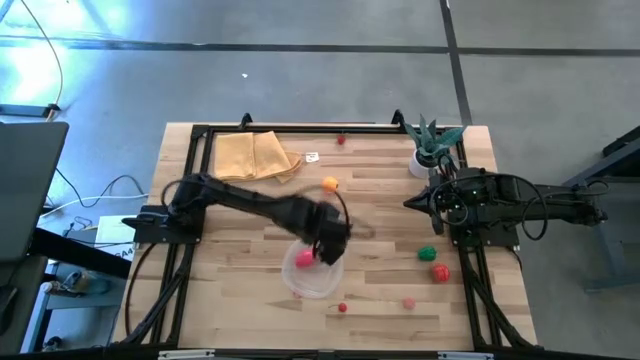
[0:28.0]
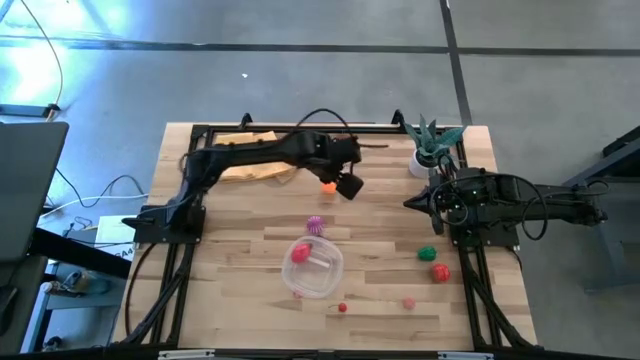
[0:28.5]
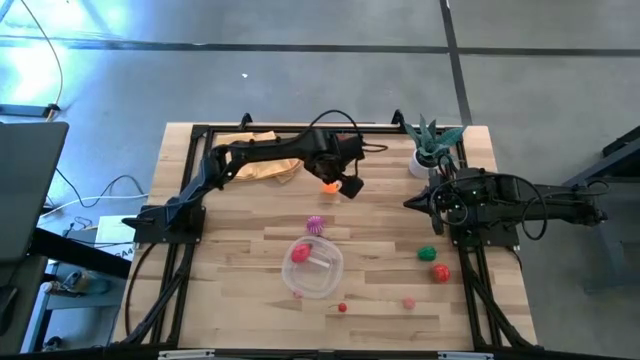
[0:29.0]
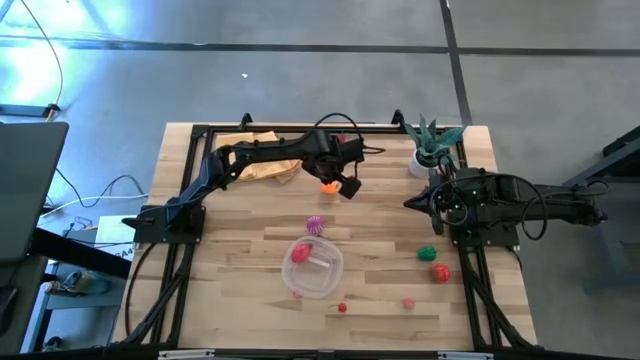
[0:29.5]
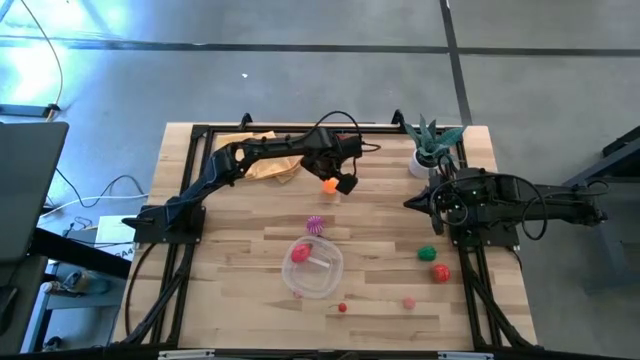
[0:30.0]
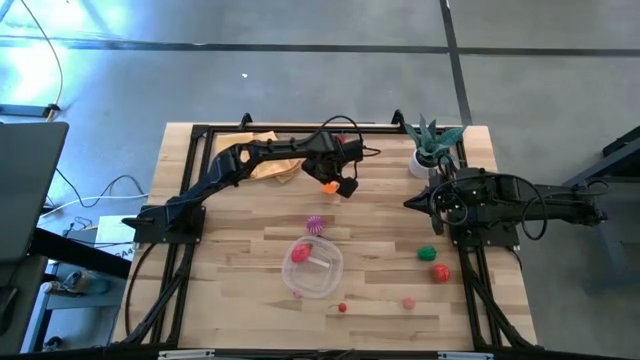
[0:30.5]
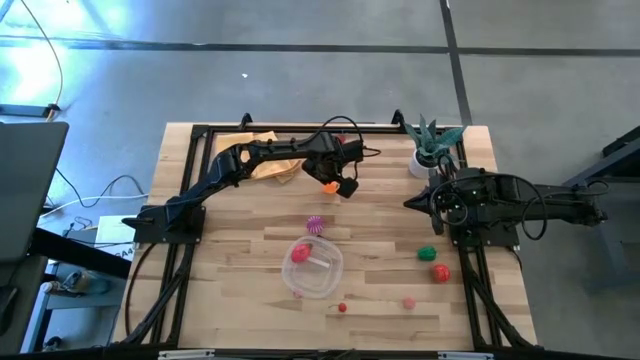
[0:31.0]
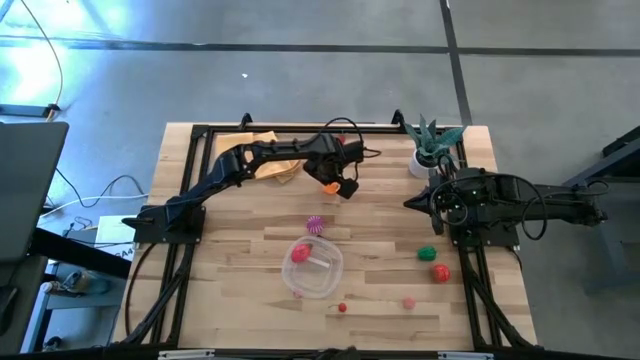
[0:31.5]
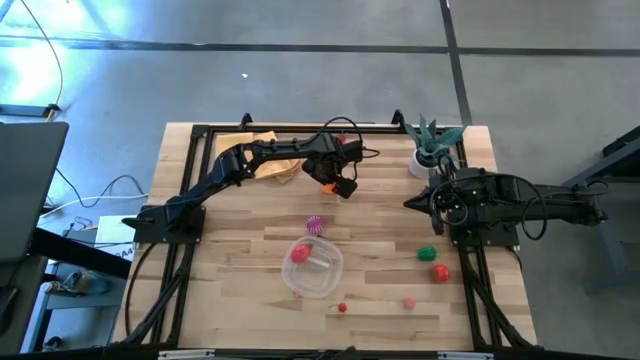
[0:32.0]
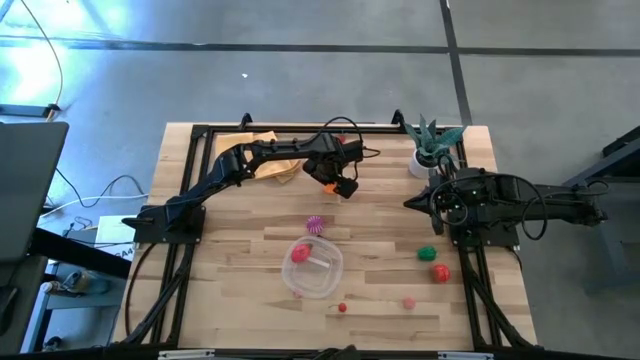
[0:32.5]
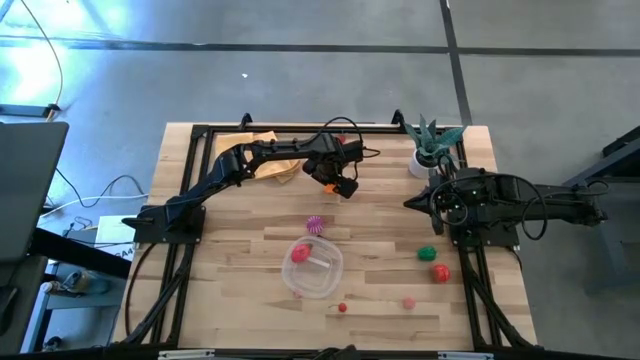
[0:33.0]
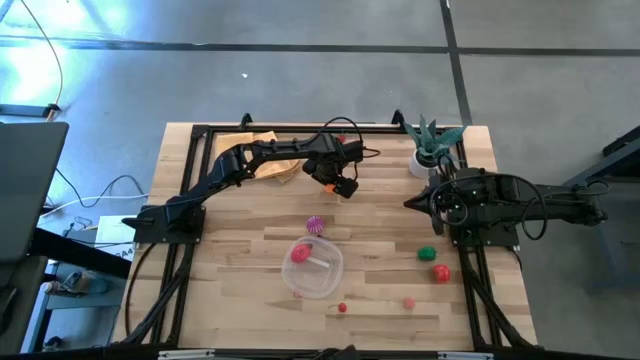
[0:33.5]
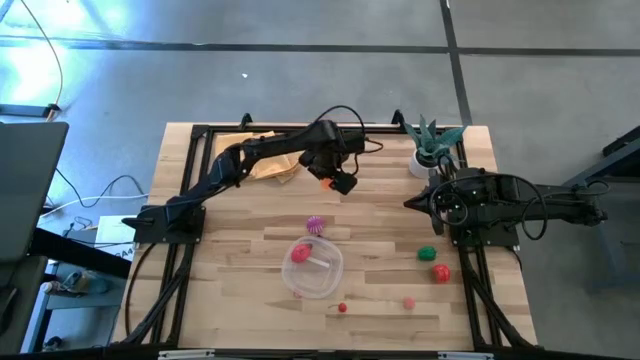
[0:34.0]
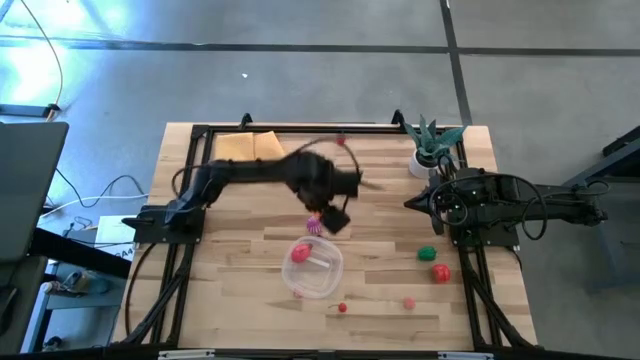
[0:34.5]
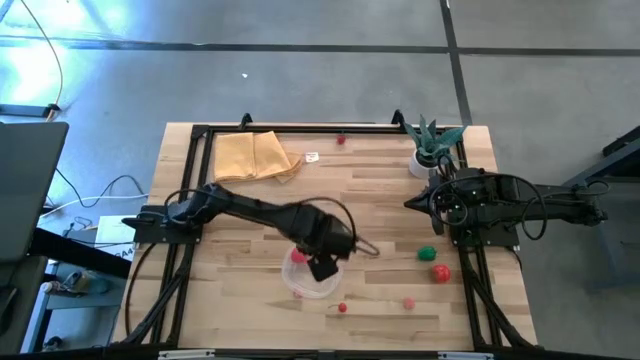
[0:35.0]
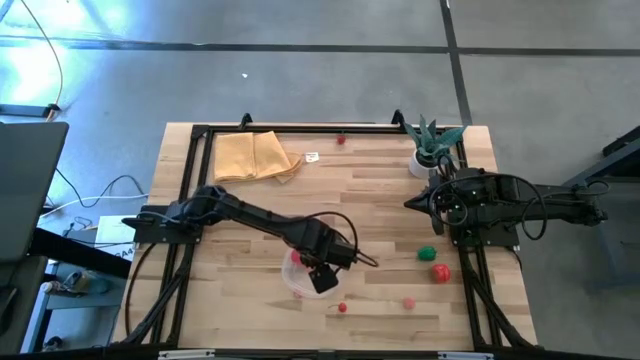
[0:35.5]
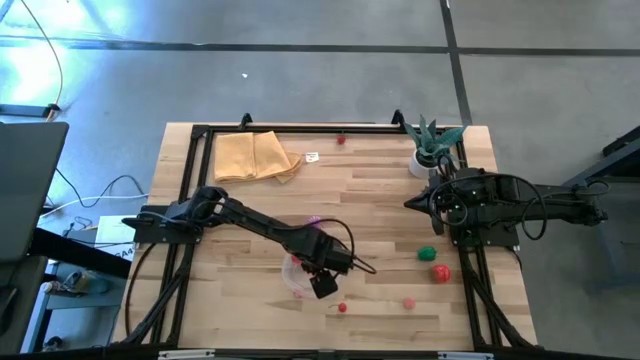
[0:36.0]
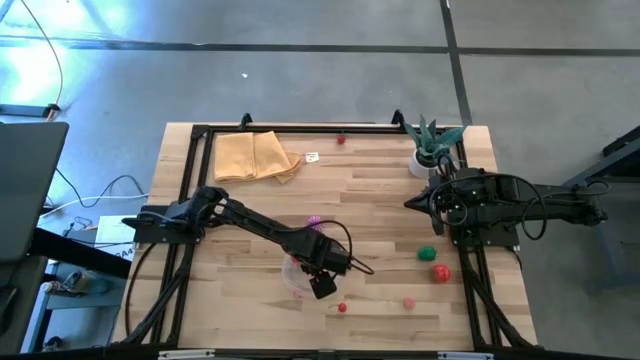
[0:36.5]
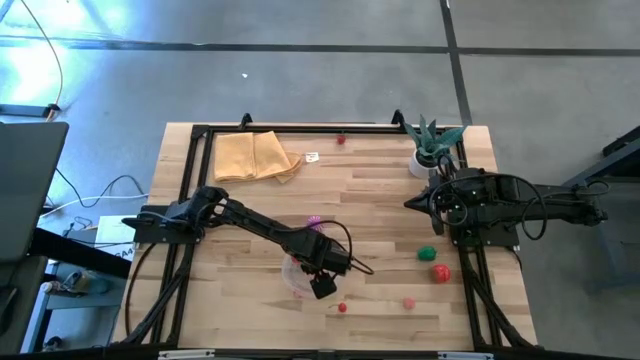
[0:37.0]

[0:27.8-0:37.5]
Task: Pick and placing Produce into tupperware
Put the orange into the bin

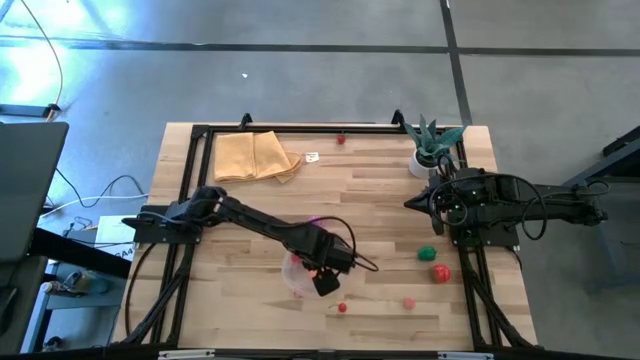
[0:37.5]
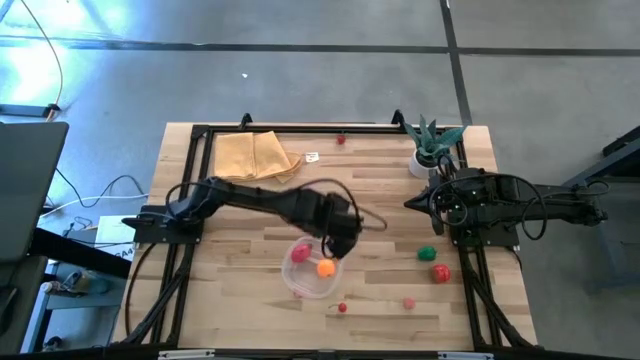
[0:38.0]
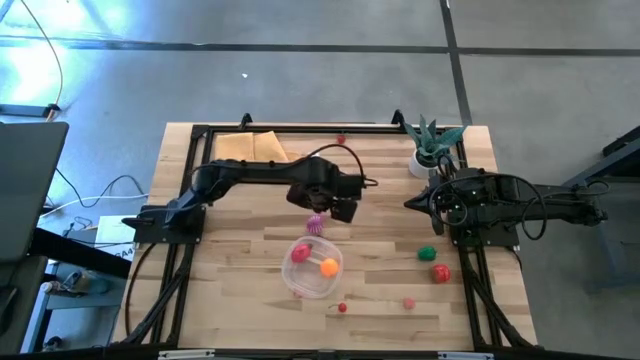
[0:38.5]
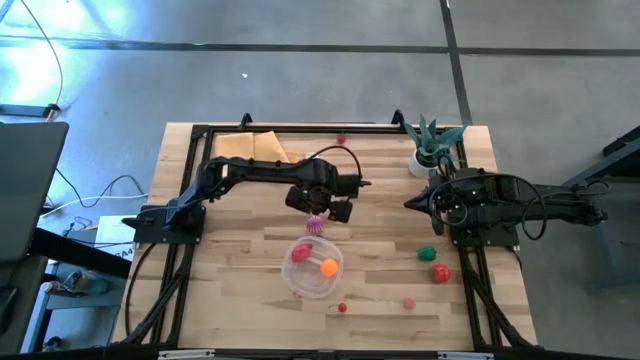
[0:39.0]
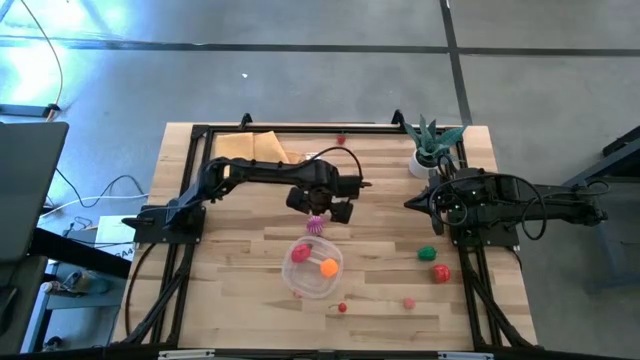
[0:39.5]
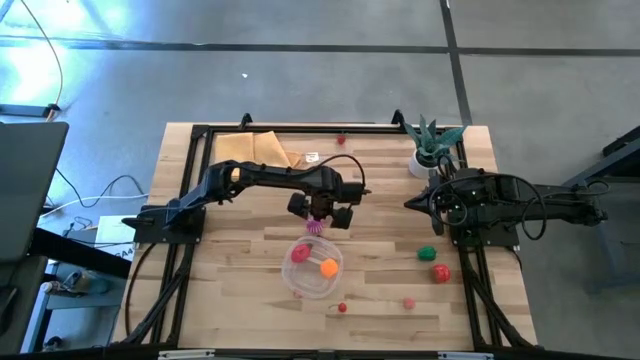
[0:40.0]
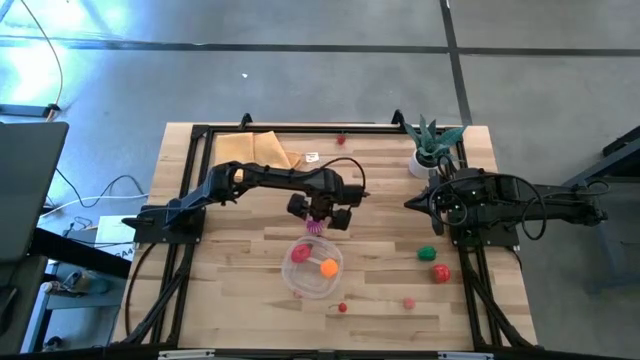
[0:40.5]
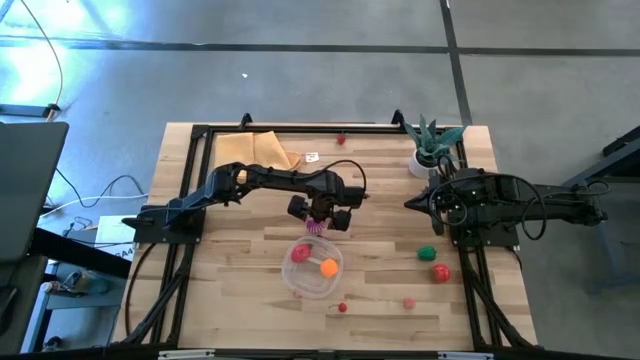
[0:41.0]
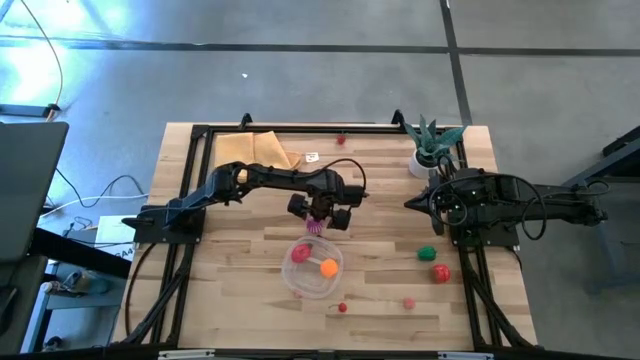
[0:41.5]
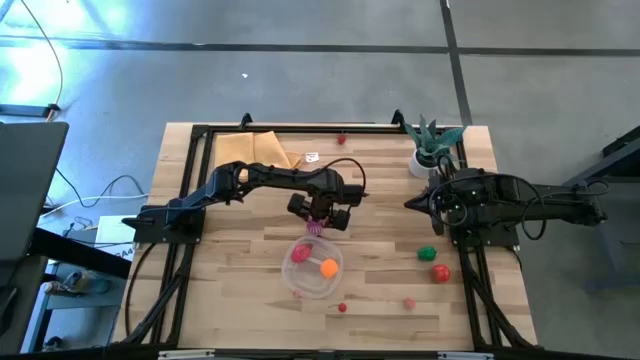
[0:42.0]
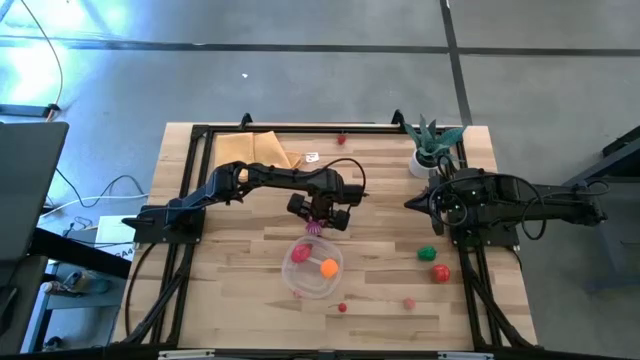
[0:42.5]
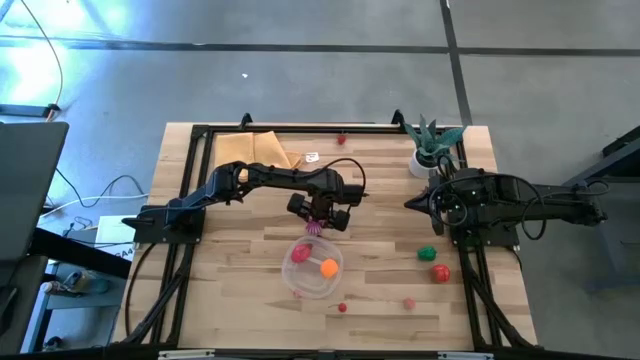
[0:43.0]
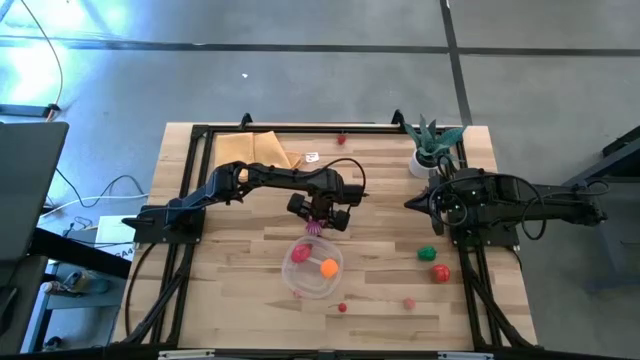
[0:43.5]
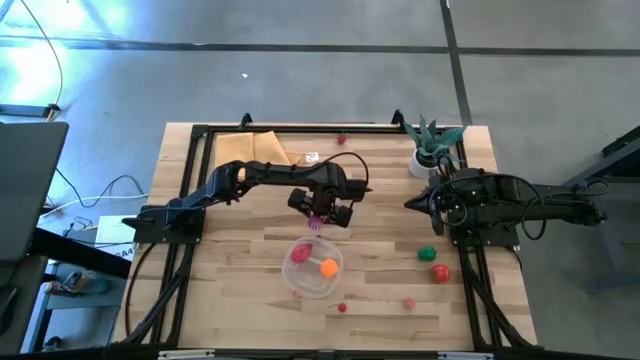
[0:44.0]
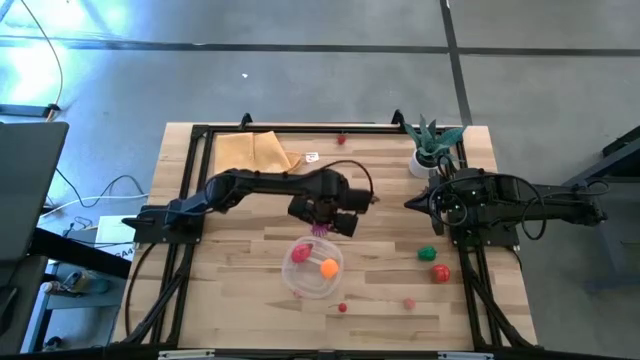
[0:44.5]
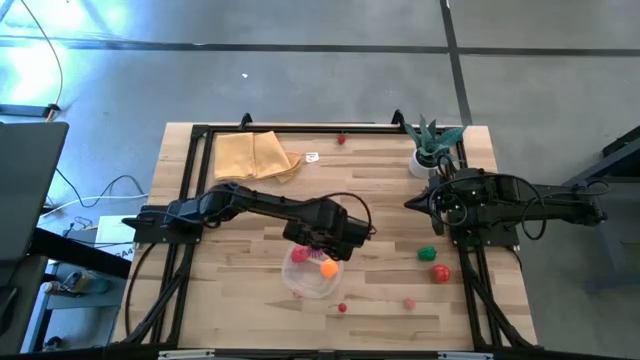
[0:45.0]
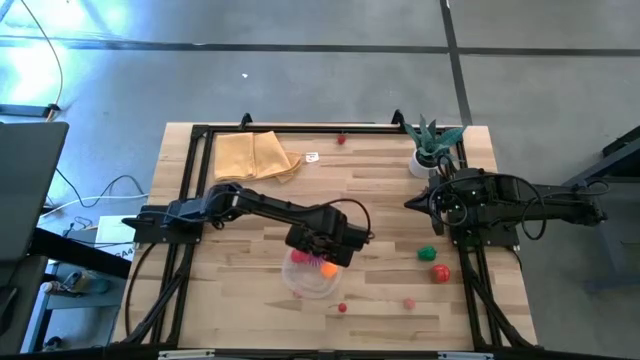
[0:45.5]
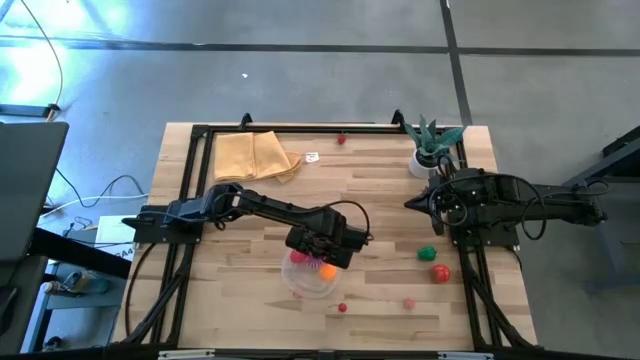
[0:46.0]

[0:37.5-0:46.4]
Put the onion into the bin

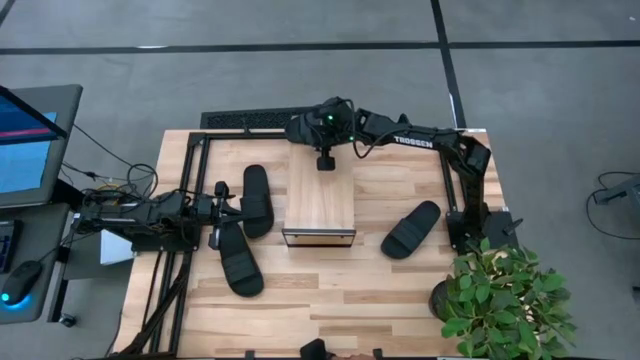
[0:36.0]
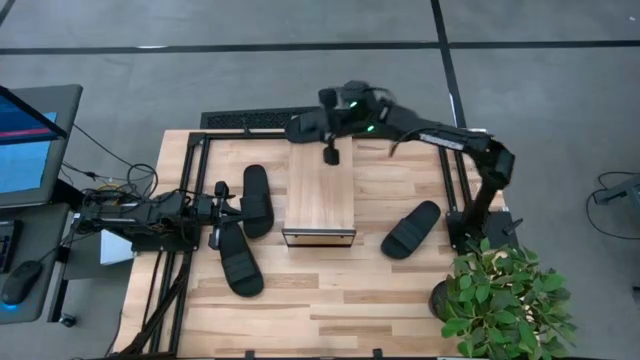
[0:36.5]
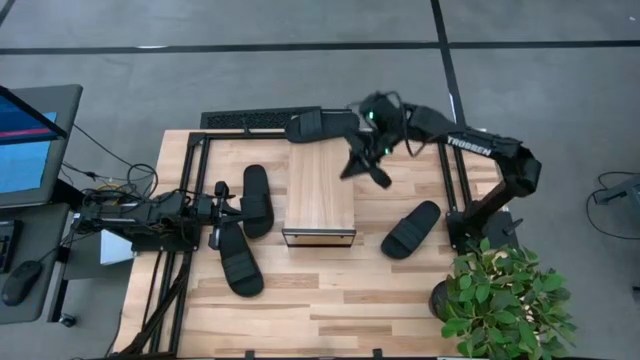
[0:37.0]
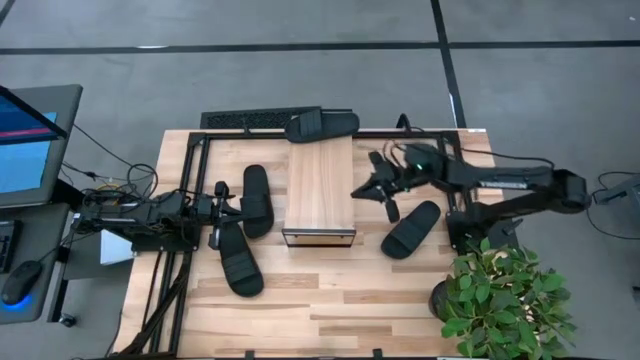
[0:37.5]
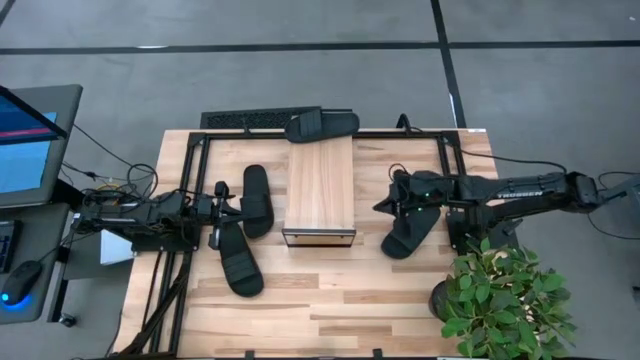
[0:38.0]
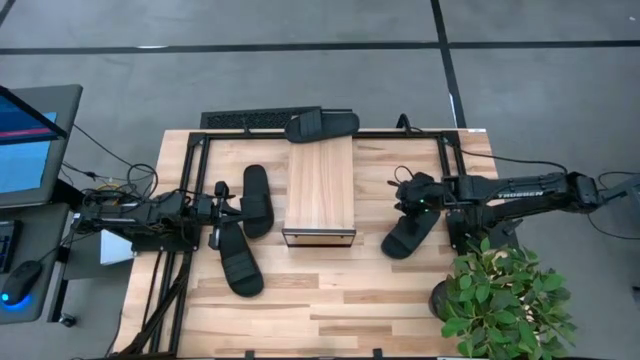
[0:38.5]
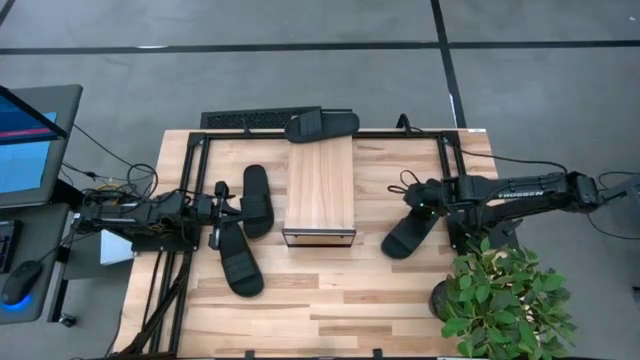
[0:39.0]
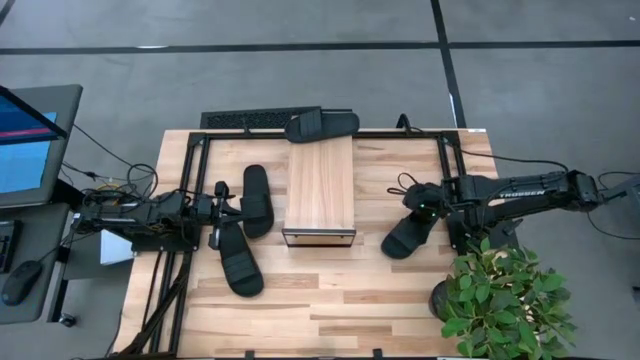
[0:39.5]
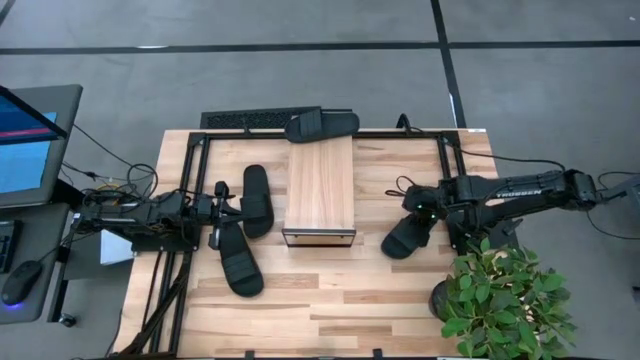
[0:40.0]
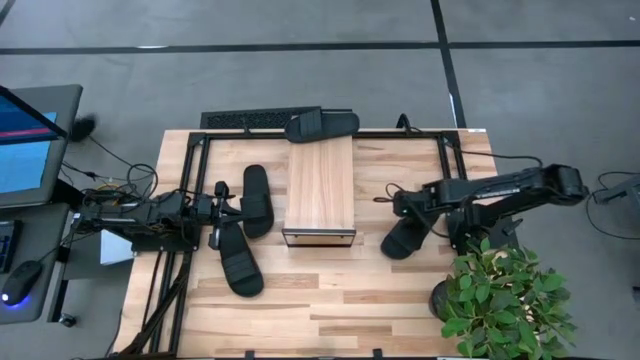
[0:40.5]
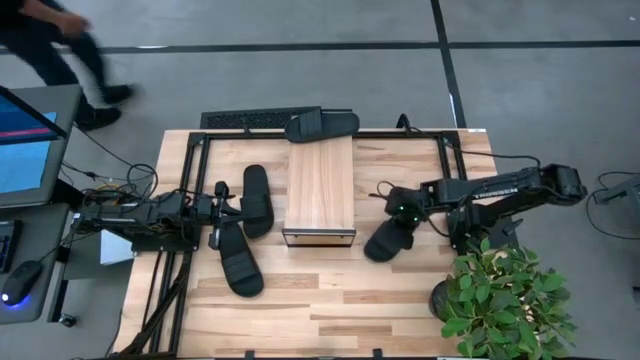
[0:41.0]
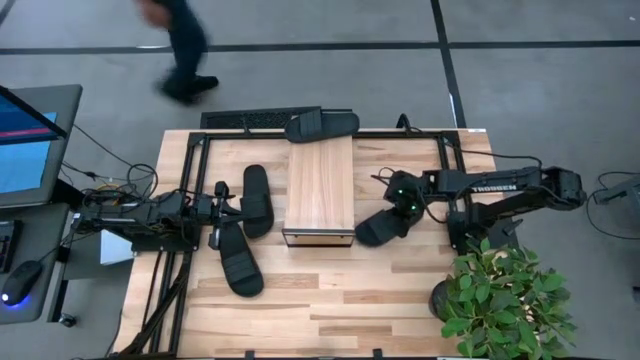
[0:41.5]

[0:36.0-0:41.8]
Task: Pick and place slides into the shelf
Put the black slide on the shelf
